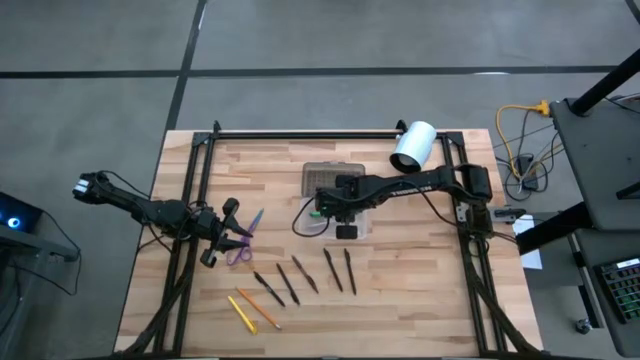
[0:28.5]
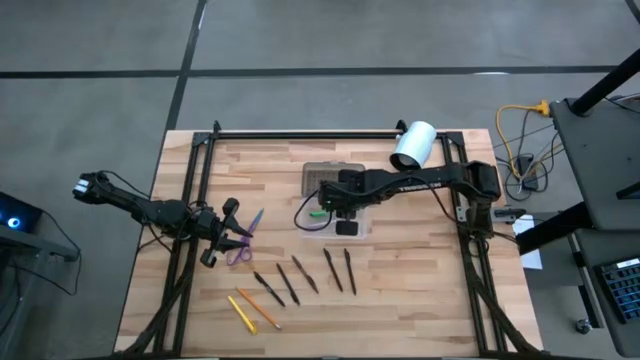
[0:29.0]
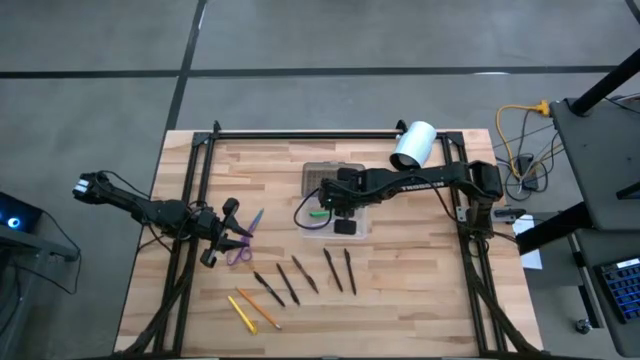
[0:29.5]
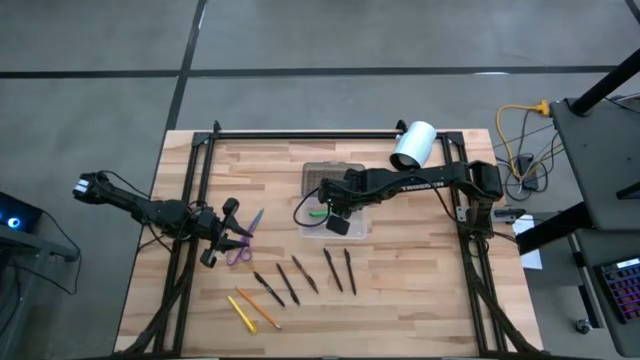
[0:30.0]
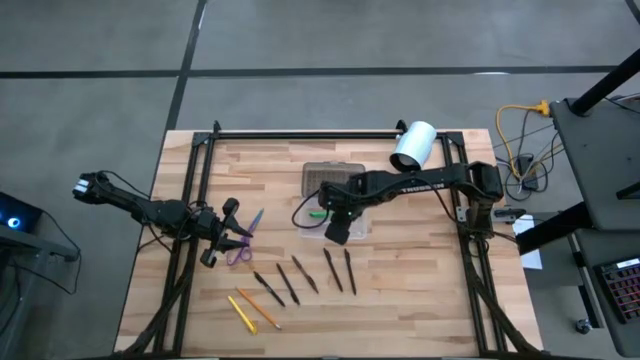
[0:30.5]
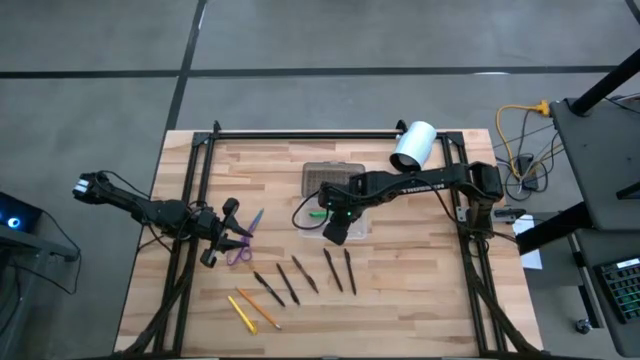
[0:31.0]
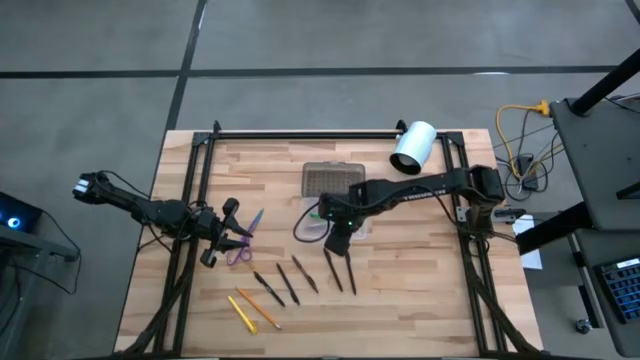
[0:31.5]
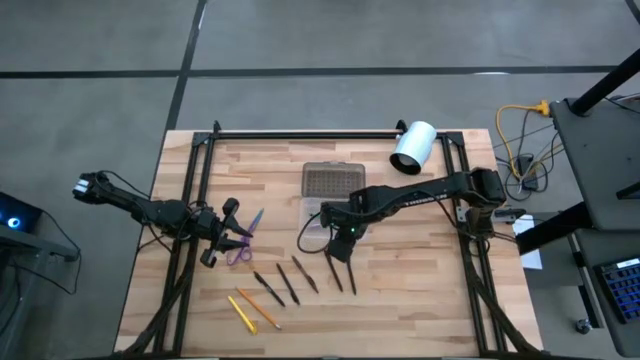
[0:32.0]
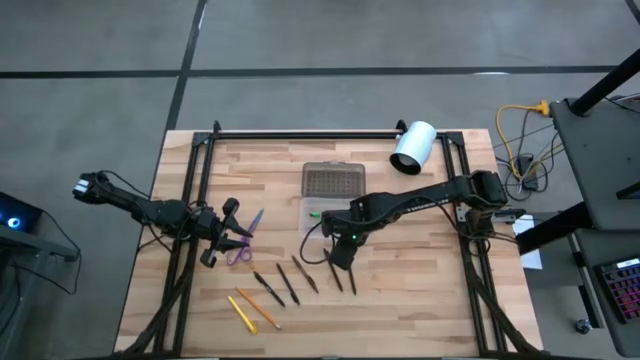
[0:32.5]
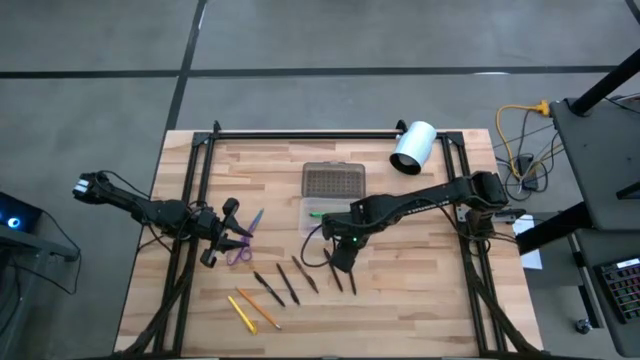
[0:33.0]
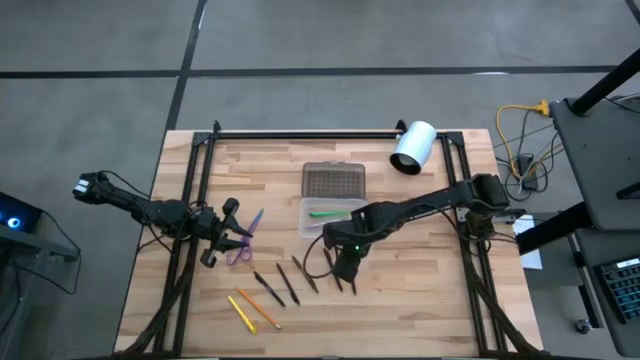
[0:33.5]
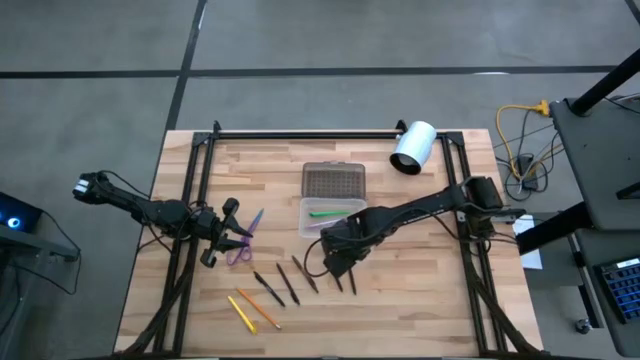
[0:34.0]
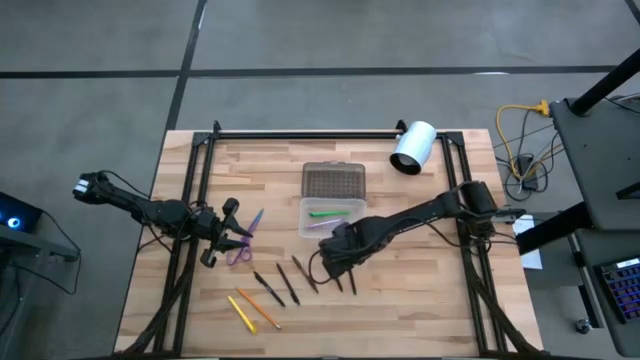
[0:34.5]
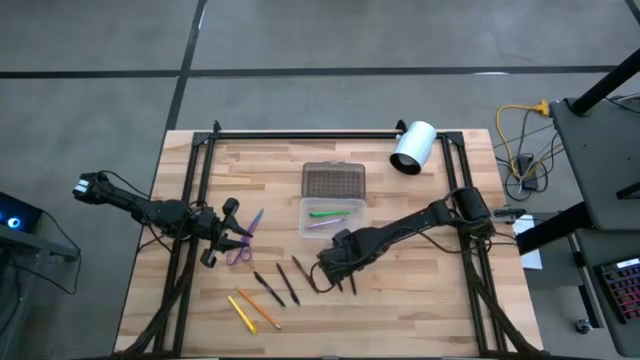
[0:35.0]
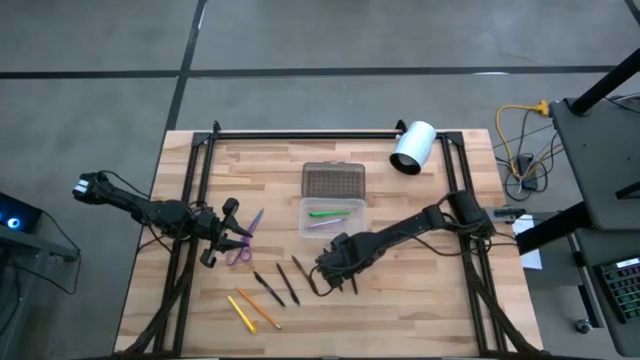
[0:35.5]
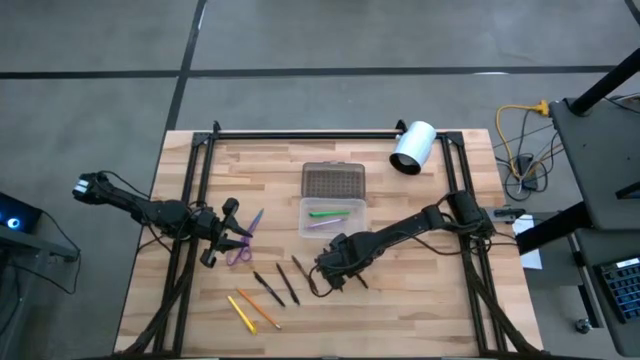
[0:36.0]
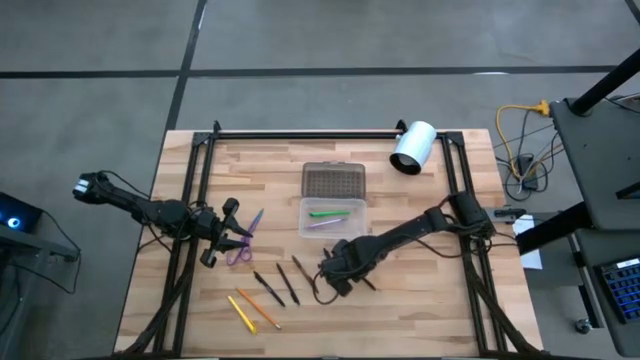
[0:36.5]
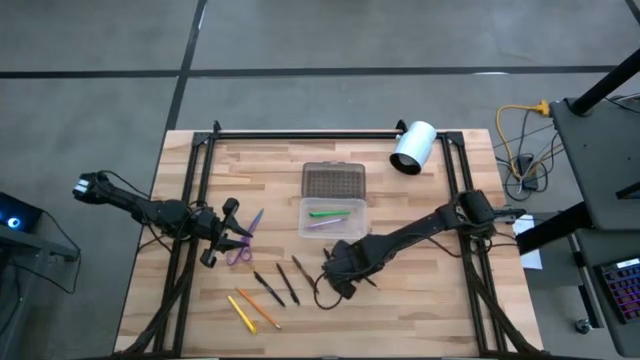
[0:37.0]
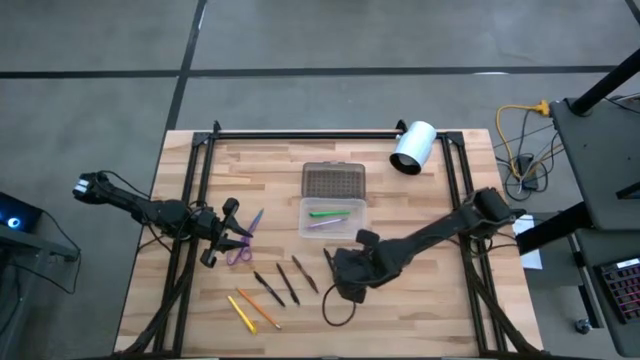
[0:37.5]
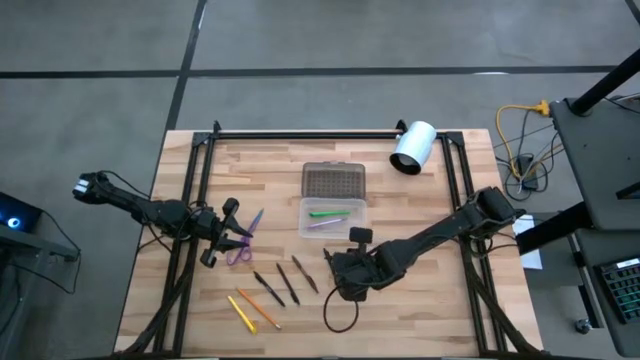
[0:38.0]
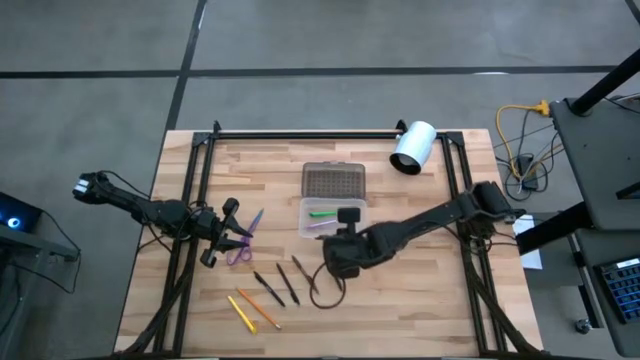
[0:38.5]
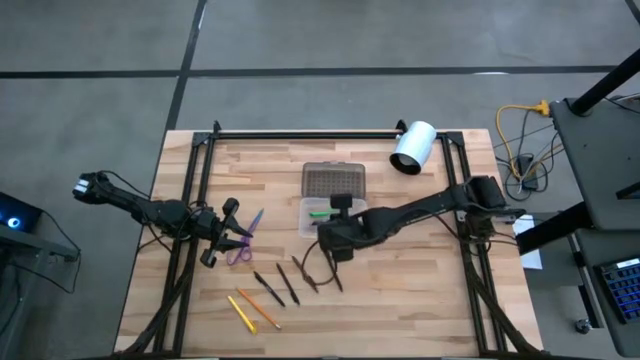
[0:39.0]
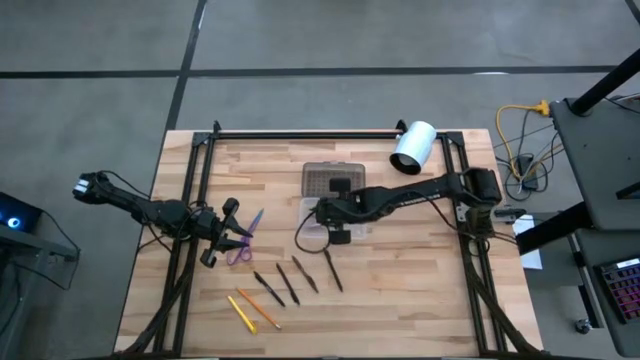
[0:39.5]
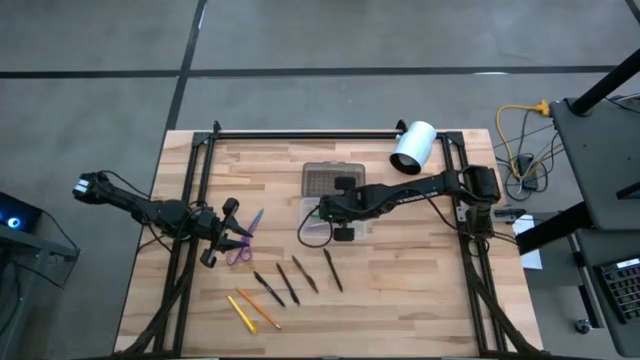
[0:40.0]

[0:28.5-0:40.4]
Task: Pick & place school supplies into a supply box
Put the black pen into the white and black supply box

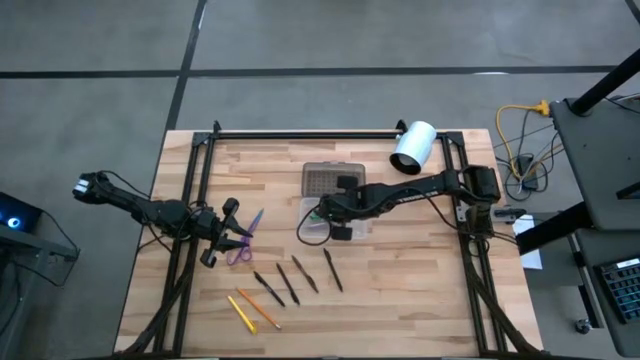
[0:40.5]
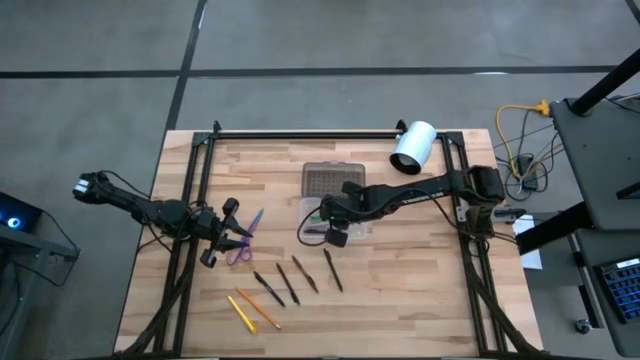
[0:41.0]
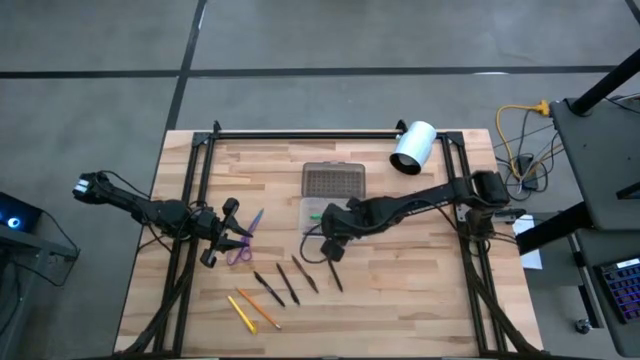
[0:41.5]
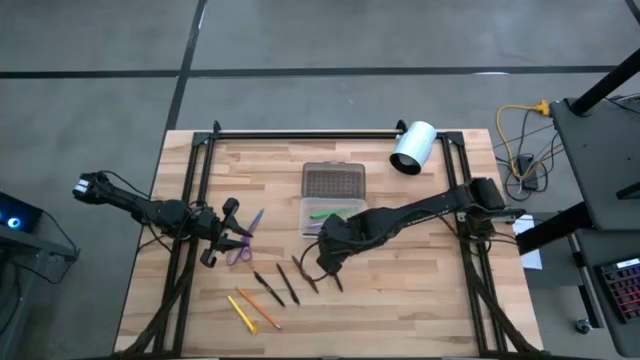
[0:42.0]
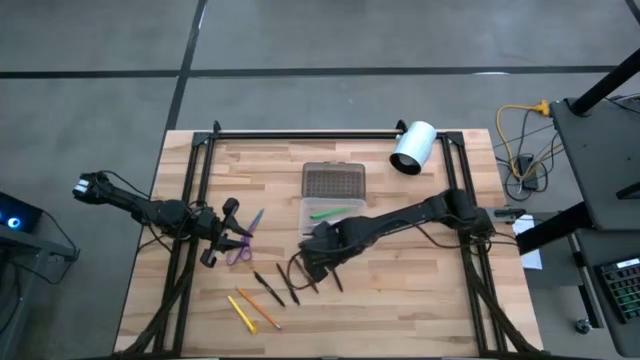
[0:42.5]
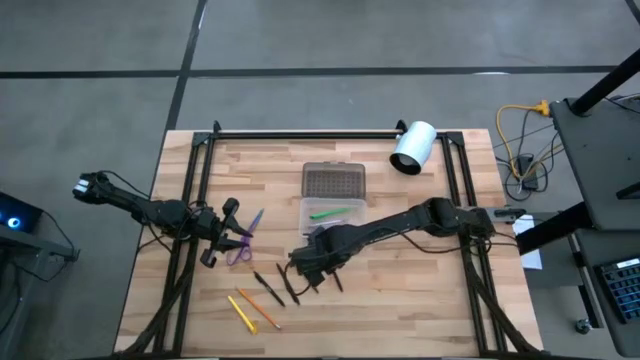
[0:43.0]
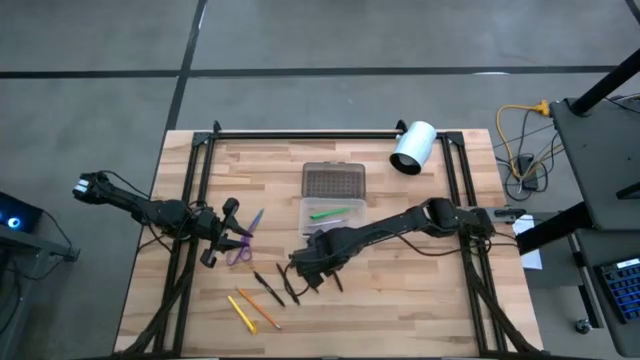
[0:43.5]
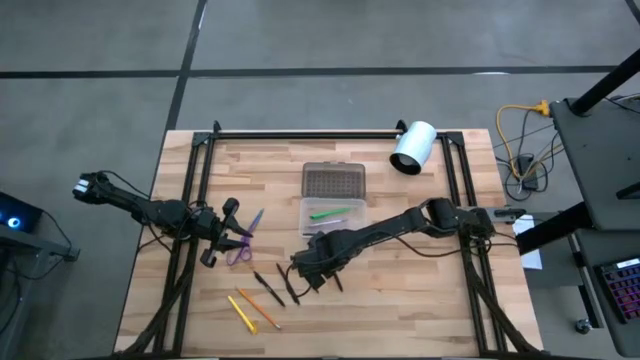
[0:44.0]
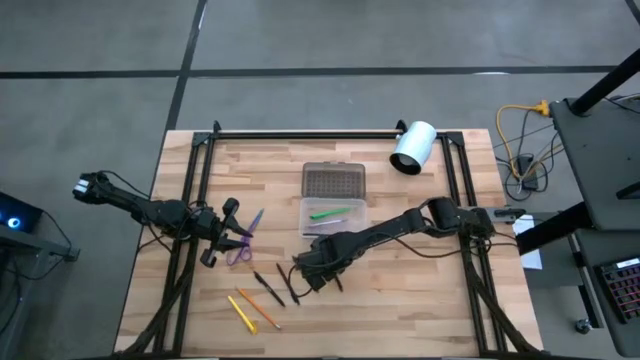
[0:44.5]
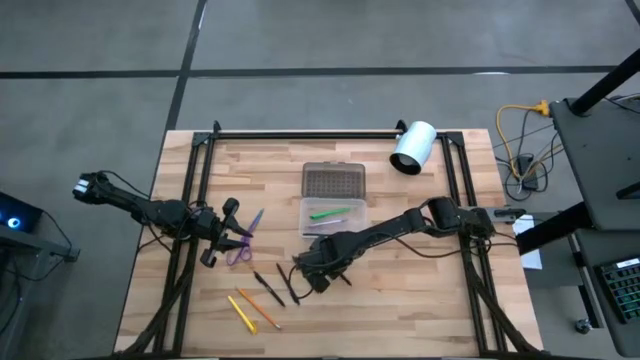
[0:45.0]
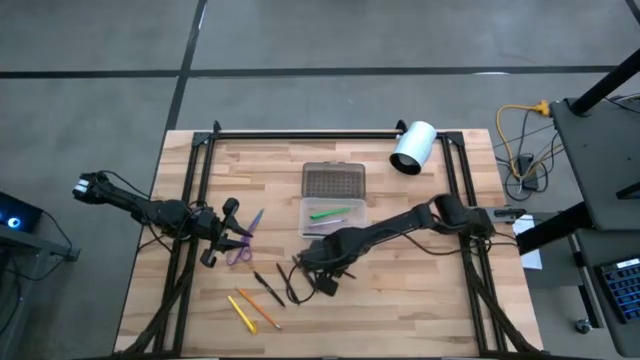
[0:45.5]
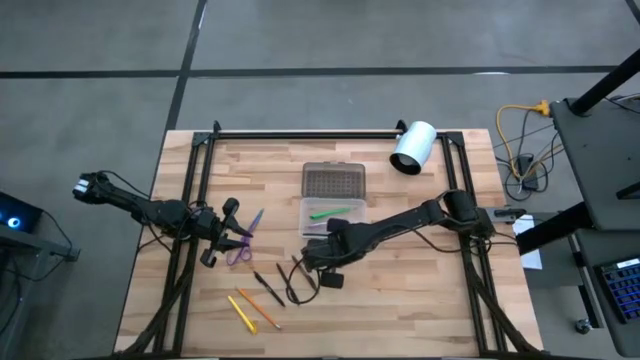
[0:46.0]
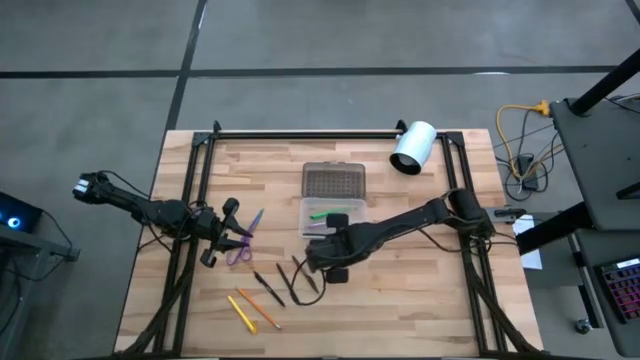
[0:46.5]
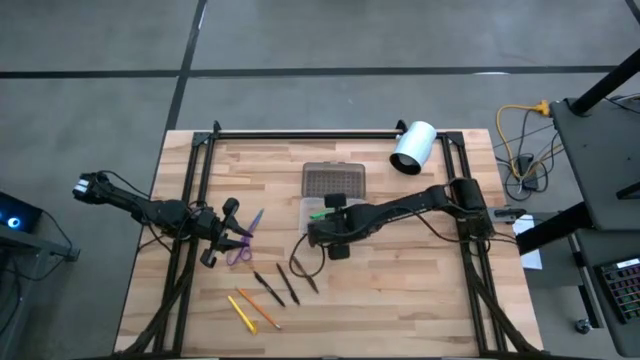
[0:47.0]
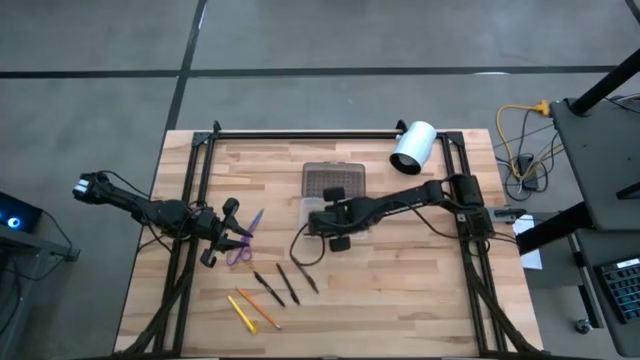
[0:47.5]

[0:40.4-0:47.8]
Put the black pen into the white and black supply box

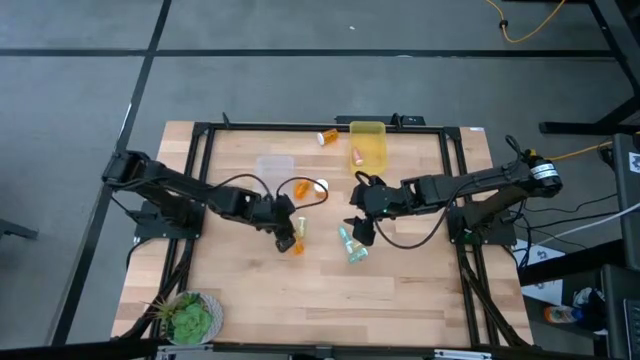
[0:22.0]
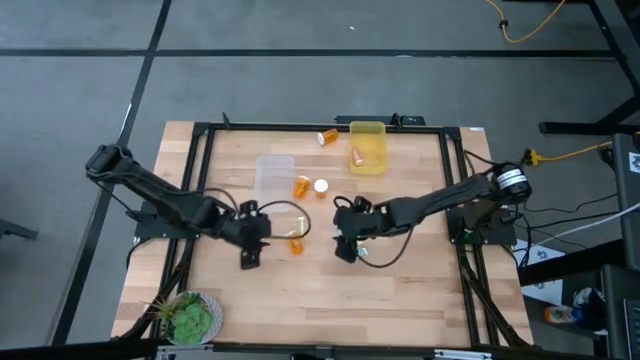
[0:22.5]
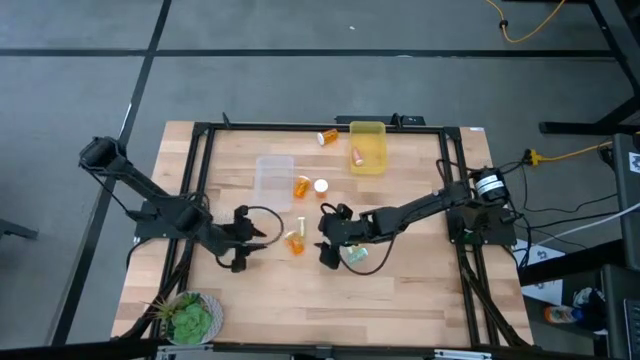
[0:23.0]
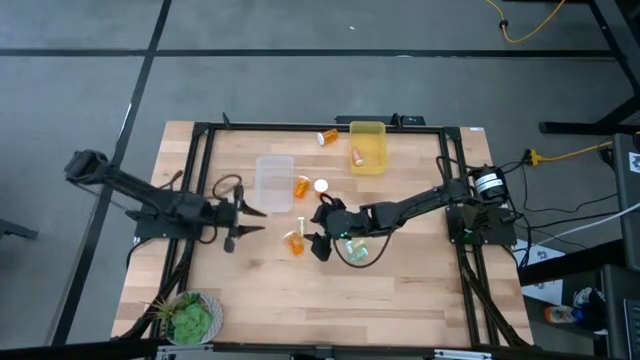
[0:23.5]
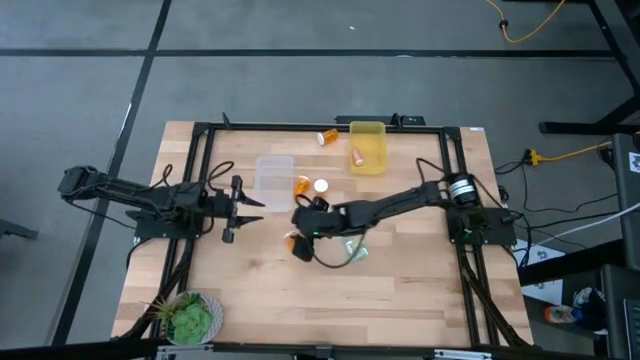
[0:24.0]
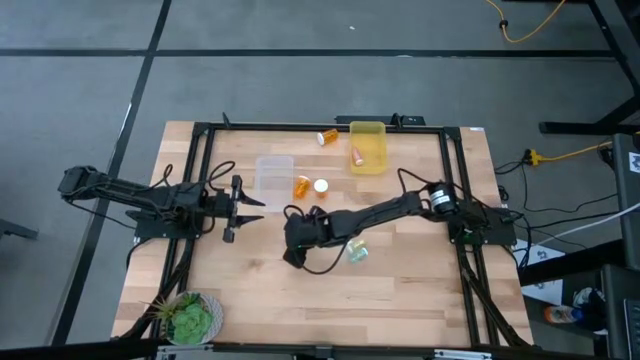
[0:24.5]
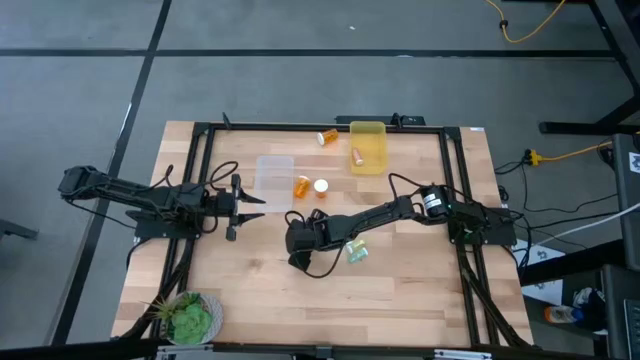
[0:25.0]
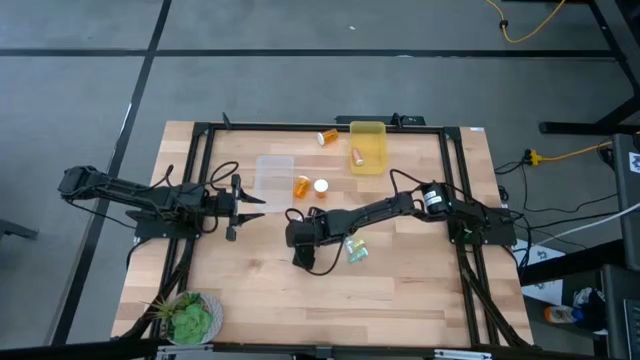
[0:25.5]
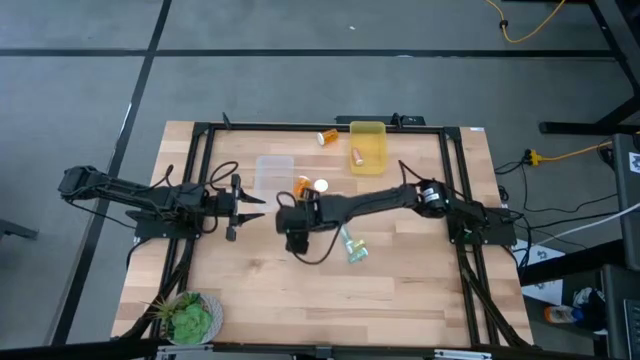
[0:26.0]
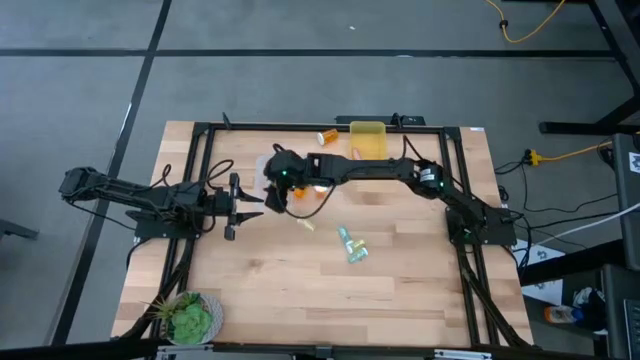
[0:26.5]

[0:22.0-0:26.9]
Task: Pick and place medicine bottles into bin by pill shape (circle, oval)
Put the large bottom orange pill bottle into the transparent bin
